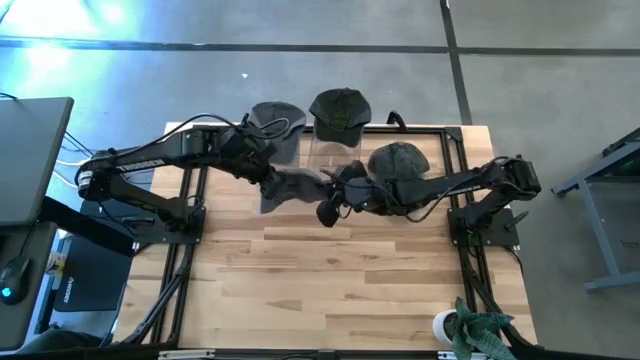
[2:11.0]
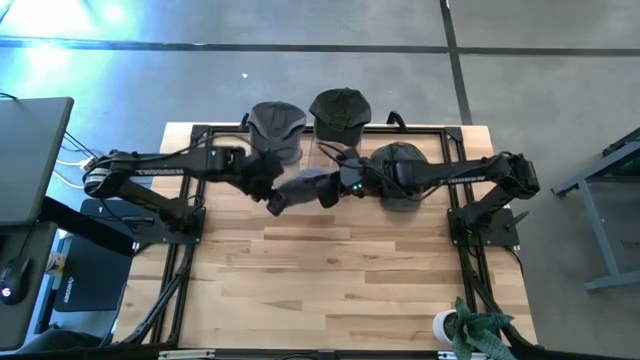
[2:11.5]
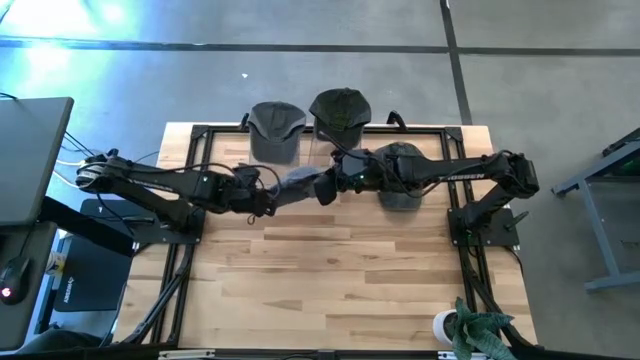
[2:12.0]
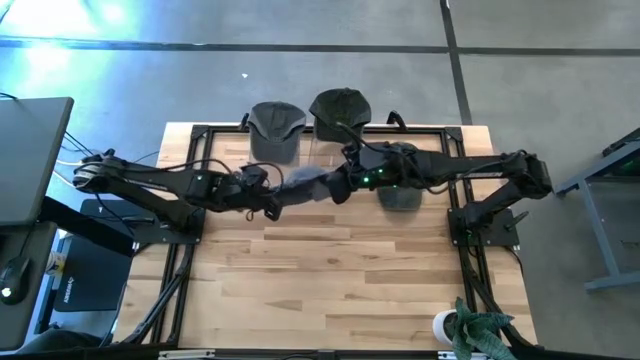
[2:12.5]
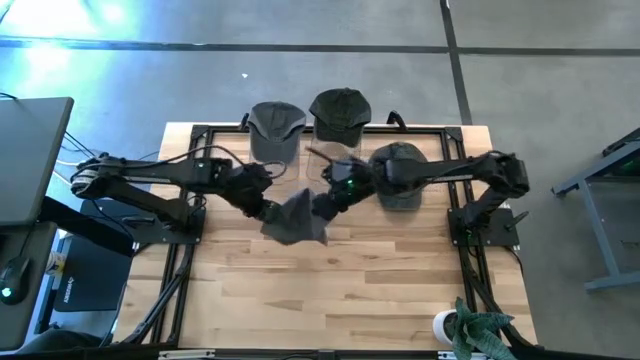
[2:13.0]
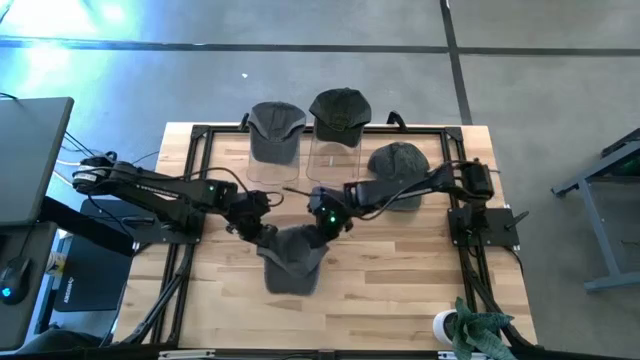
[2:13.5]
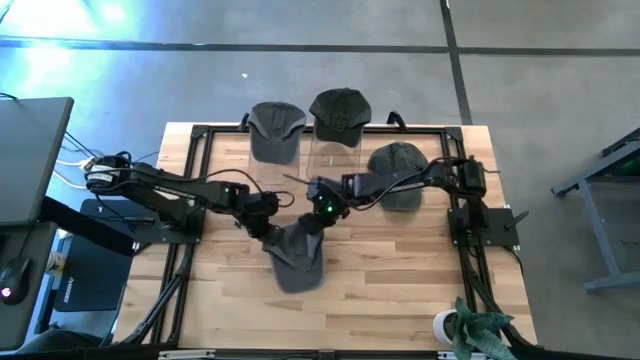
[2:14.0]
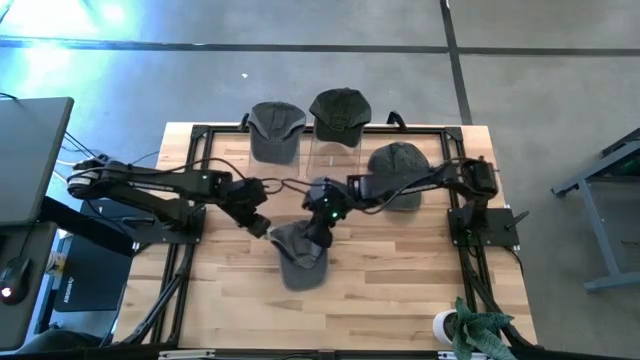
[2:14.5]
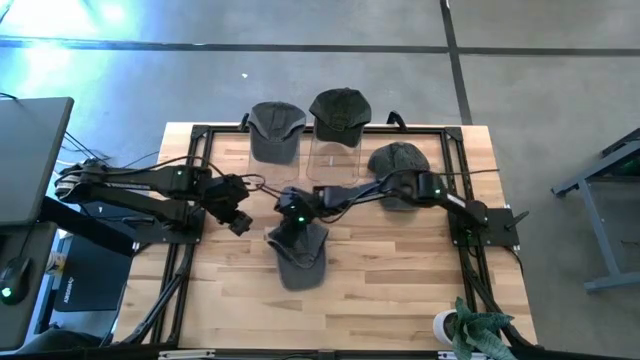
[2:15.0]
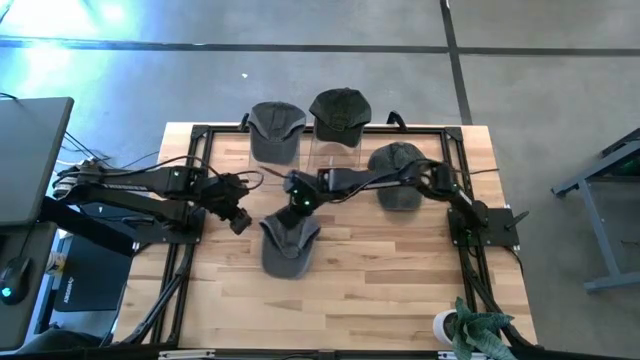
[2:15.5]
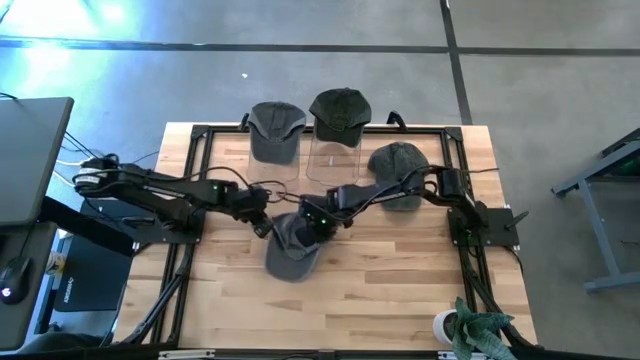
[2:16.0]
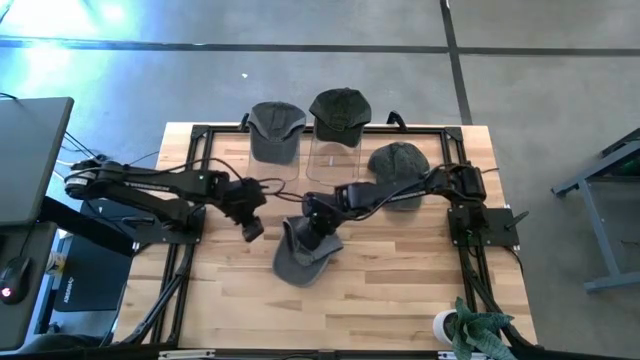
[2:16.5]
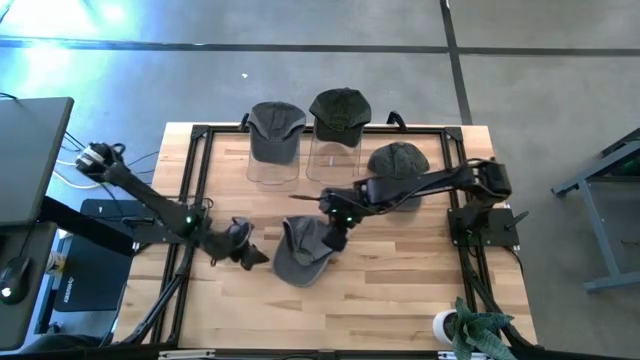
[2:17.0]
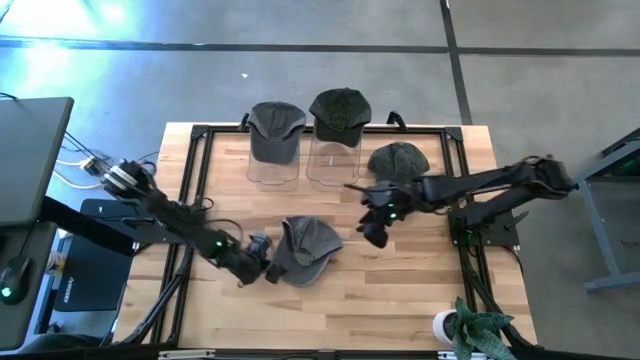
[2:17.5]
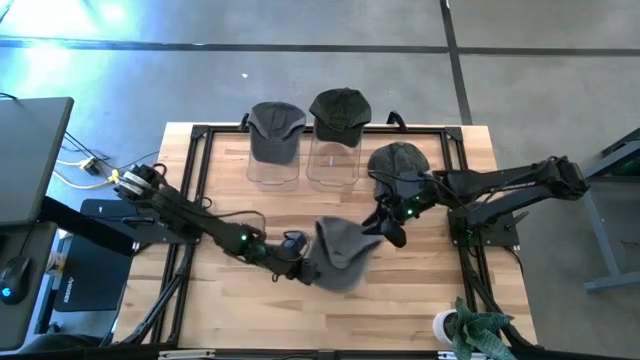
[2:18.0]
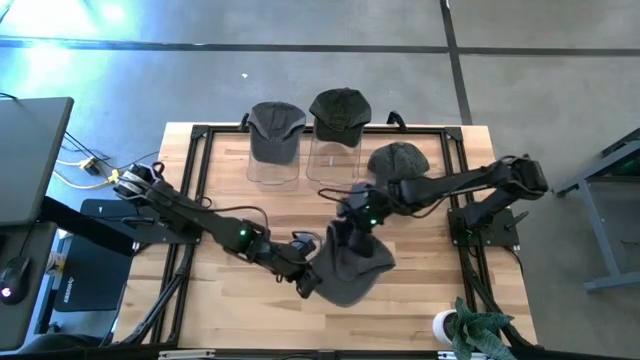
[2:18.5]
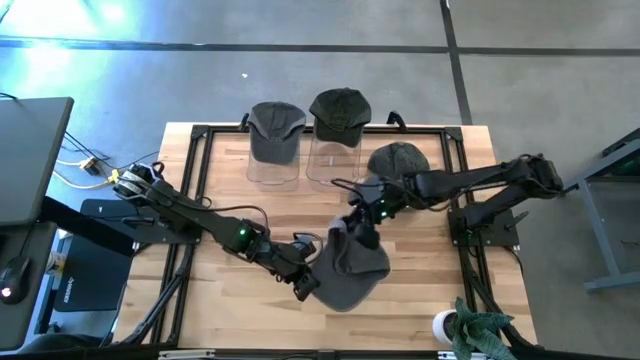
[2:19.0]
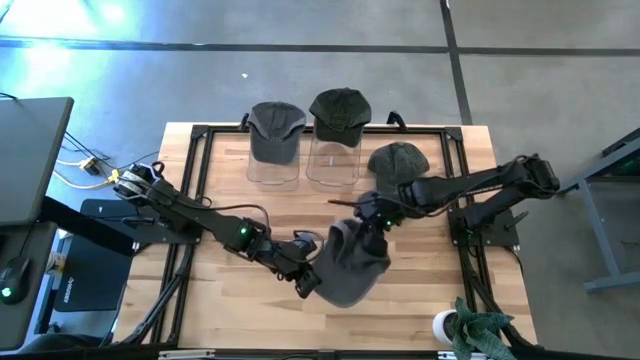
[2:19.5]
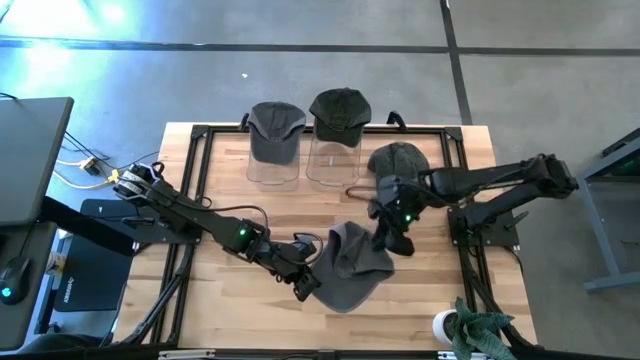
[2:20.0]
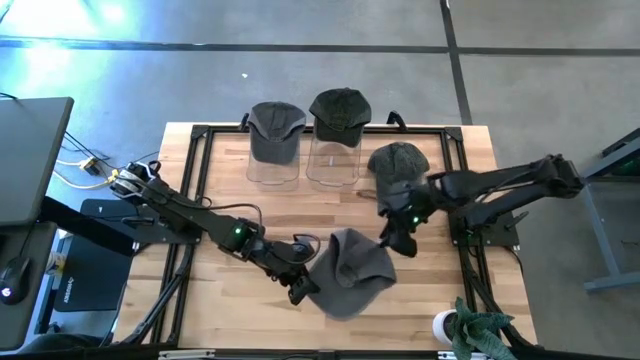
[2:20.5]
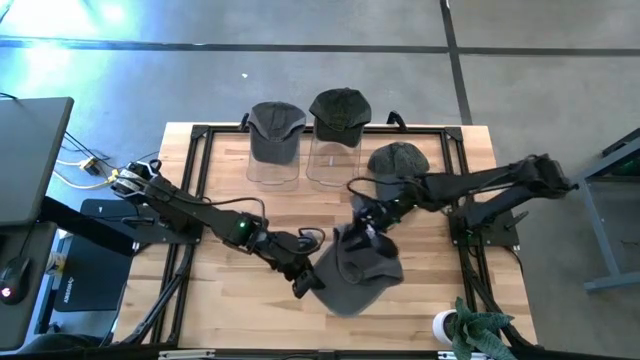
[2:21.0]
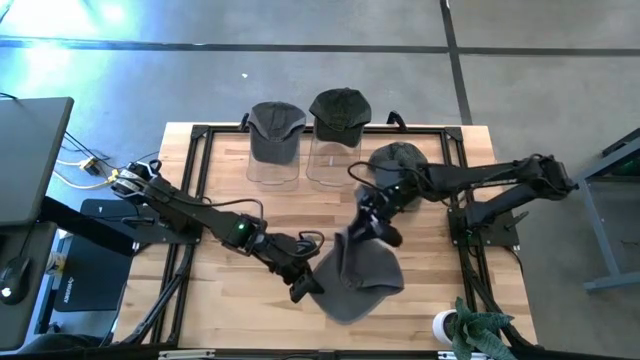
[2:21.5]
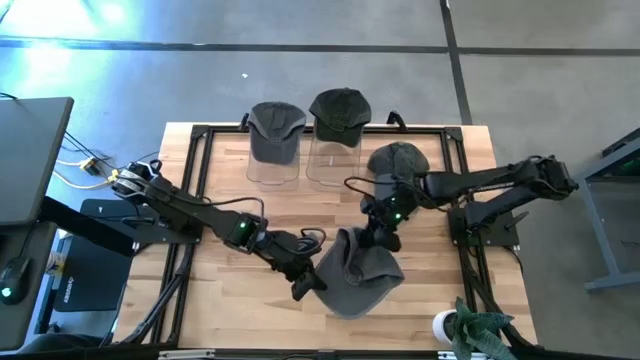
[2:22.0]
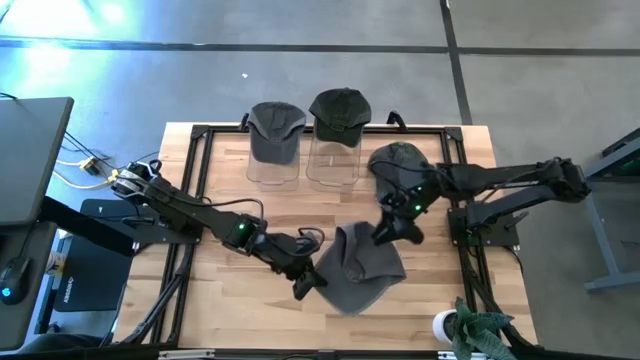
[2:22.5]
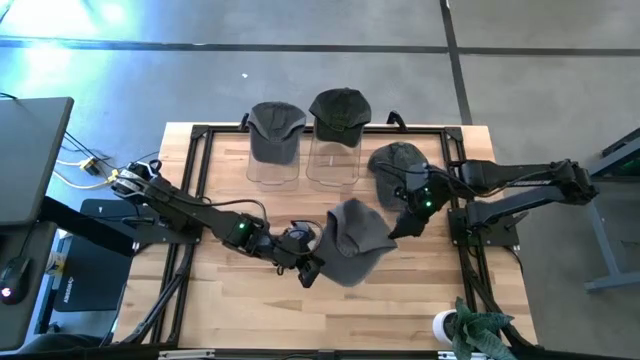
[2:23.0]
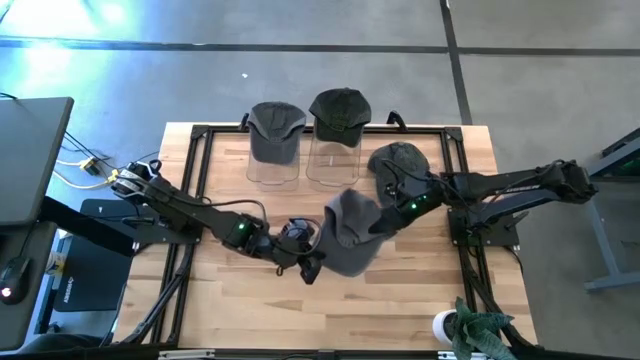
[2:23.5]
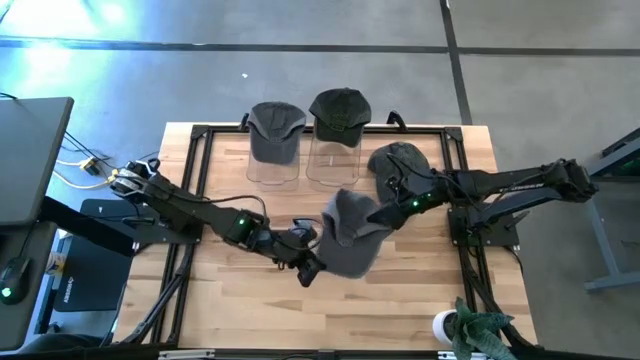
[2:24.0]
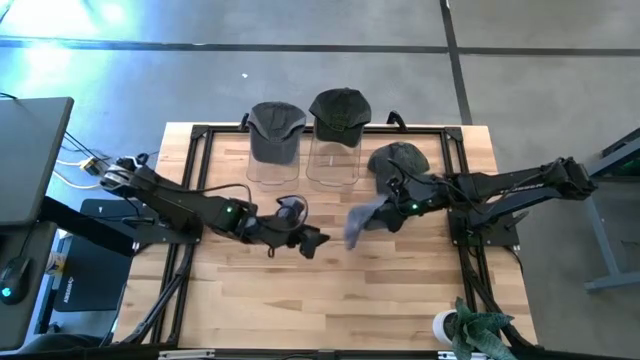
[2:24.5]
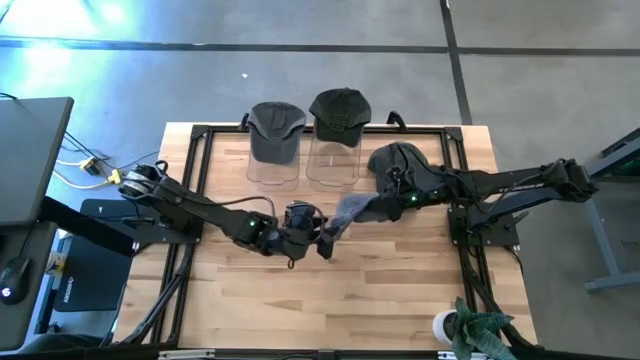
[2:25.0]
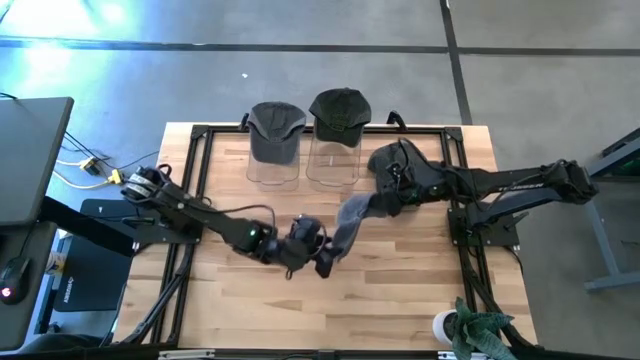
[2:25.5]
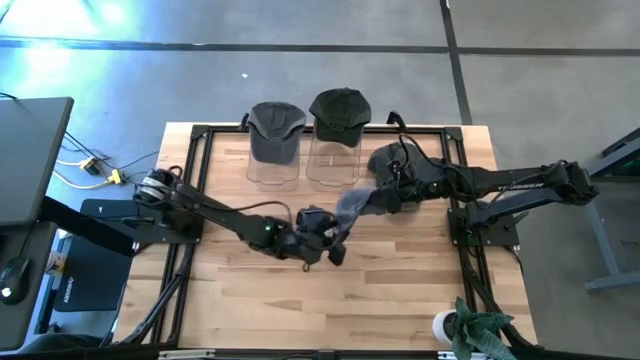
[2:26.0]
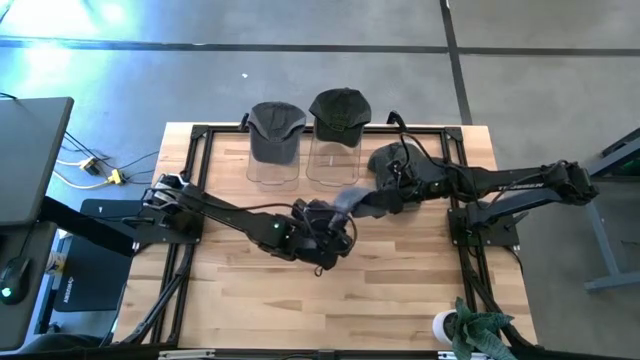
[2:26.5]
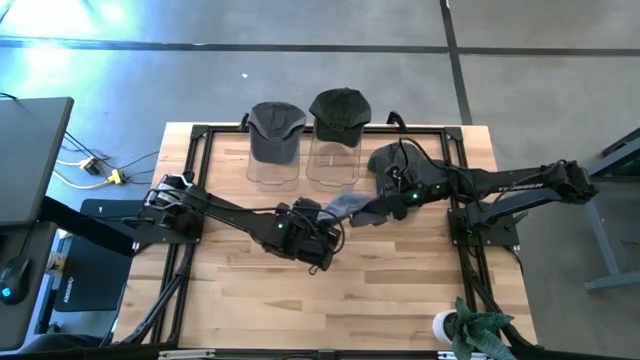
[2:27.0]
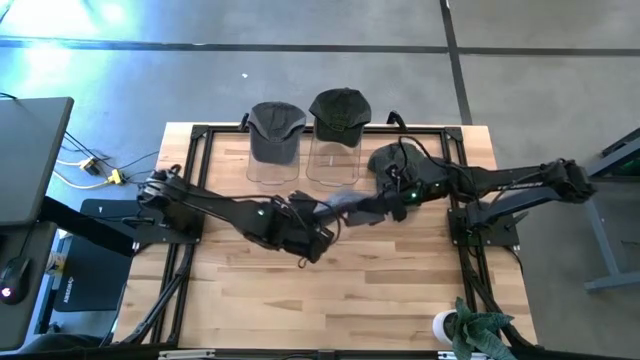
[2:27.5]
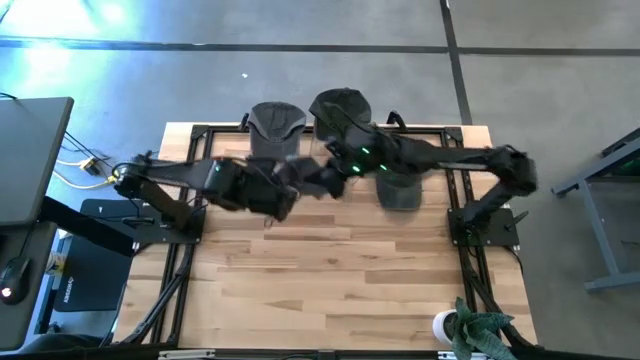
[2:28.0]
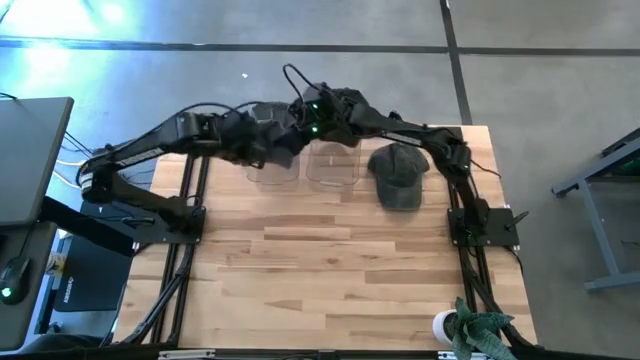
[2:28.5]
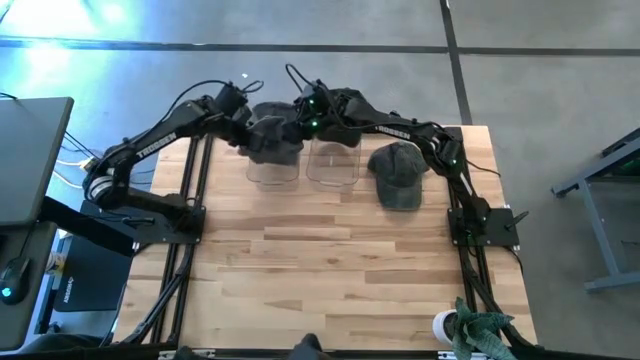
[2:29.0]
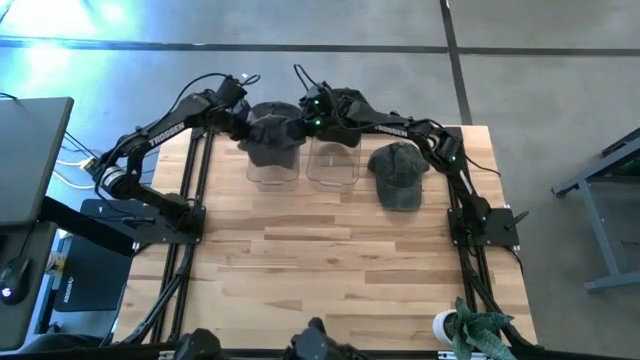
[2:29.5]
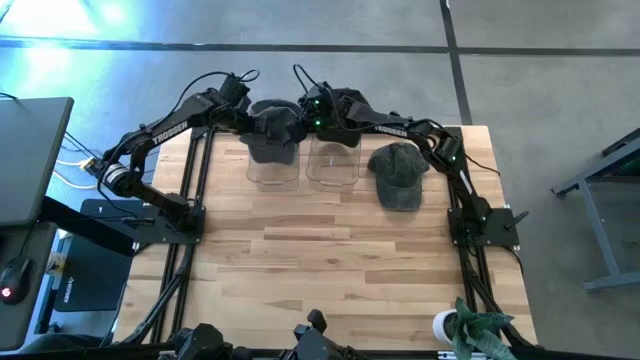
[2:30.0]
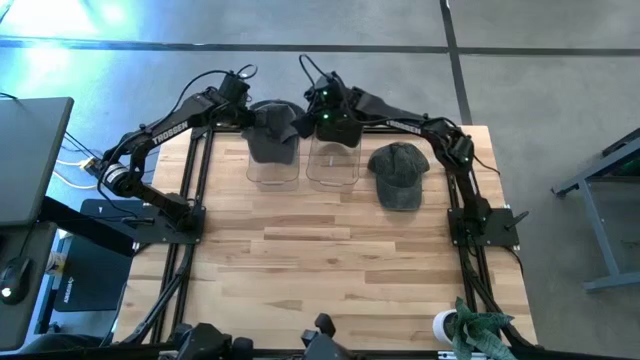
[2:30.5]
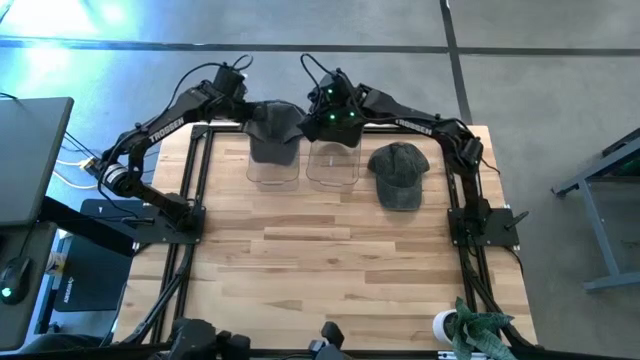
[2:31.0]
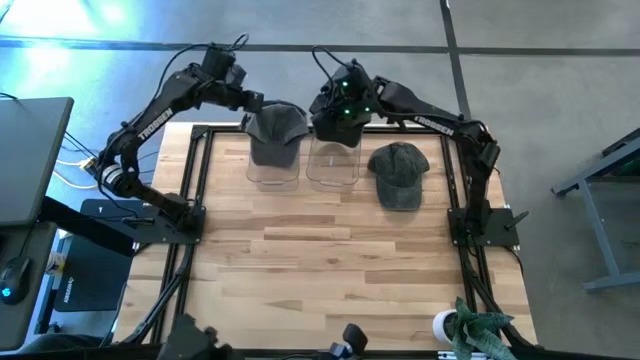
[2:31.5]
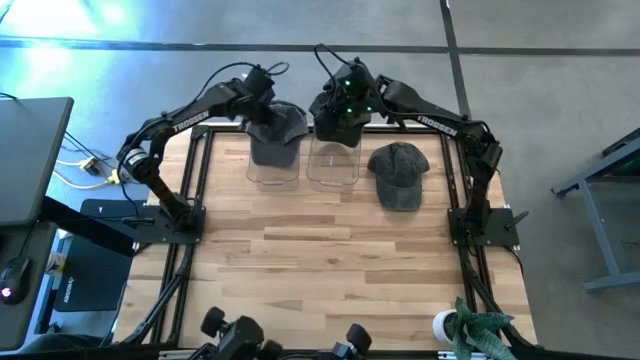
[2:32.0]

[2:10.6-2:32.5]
Task: Pick & Place hat
Put the gray cap into the left transparent bin
